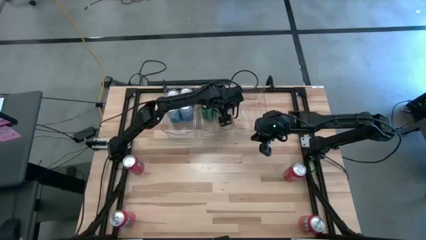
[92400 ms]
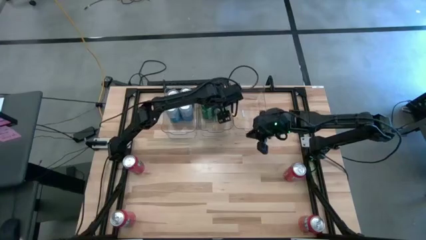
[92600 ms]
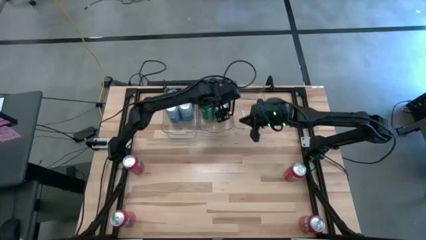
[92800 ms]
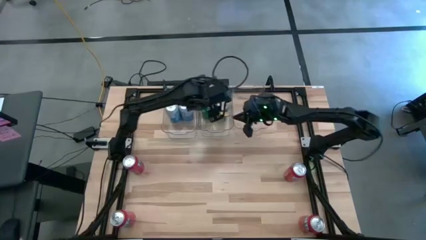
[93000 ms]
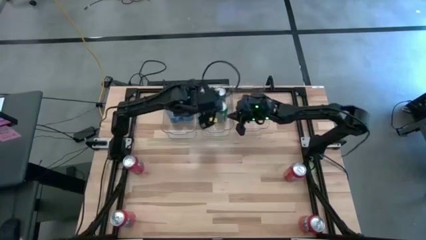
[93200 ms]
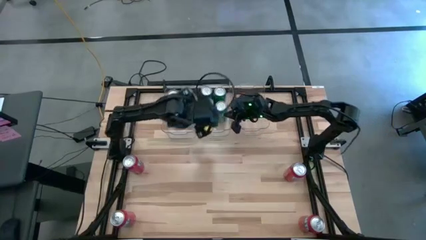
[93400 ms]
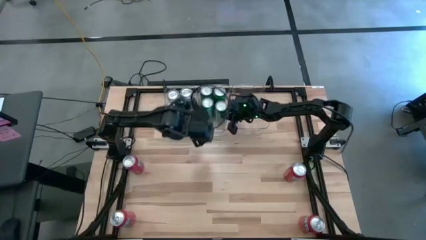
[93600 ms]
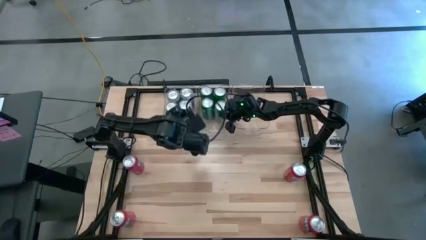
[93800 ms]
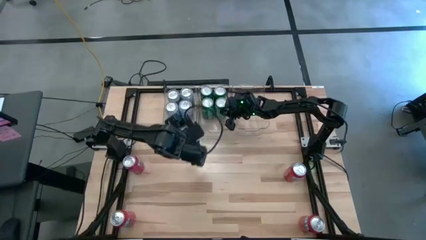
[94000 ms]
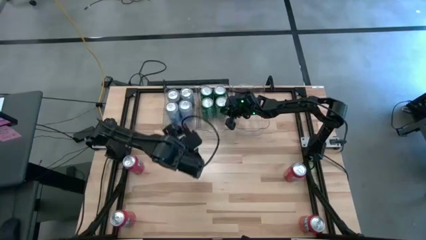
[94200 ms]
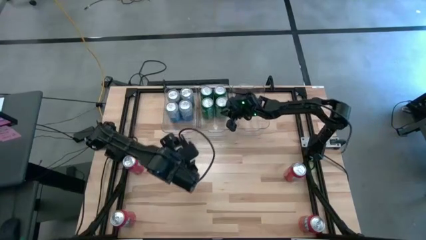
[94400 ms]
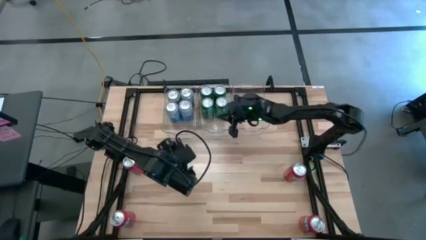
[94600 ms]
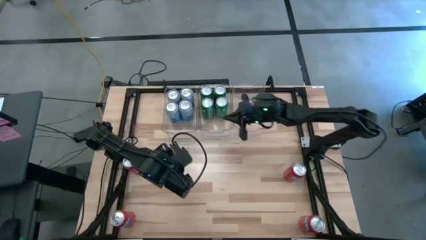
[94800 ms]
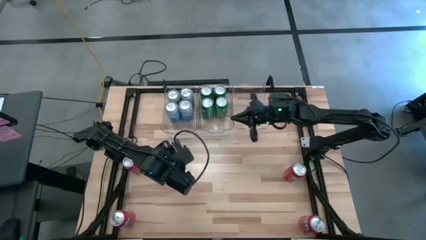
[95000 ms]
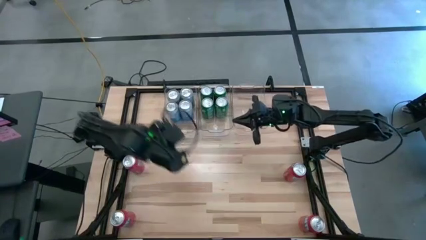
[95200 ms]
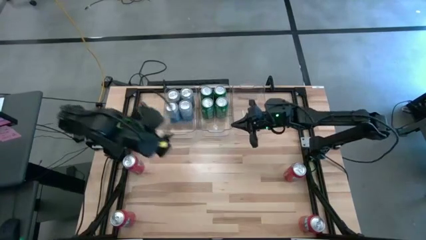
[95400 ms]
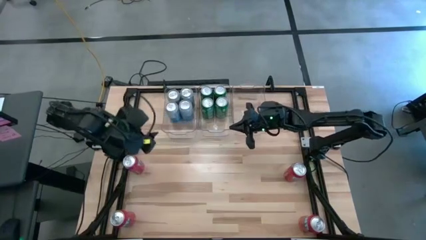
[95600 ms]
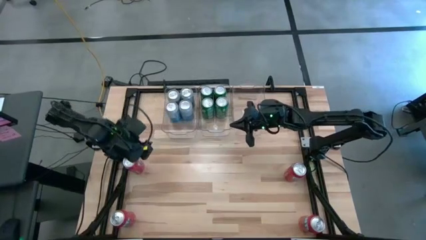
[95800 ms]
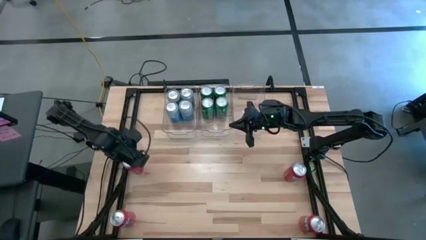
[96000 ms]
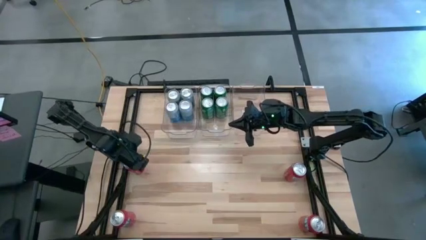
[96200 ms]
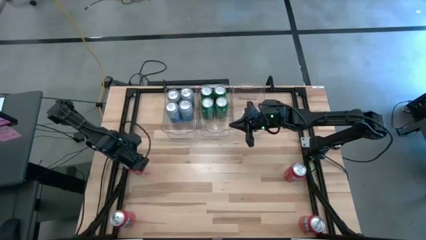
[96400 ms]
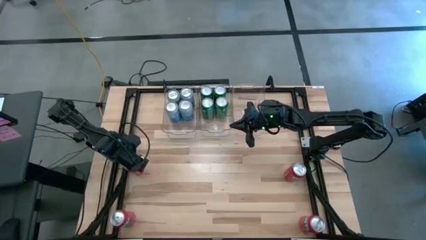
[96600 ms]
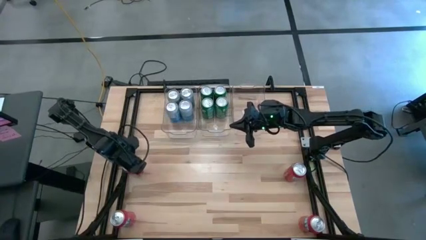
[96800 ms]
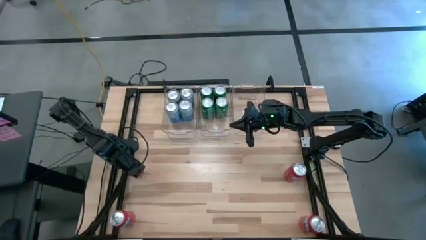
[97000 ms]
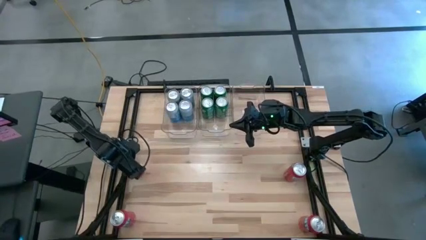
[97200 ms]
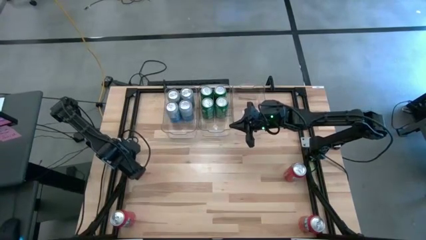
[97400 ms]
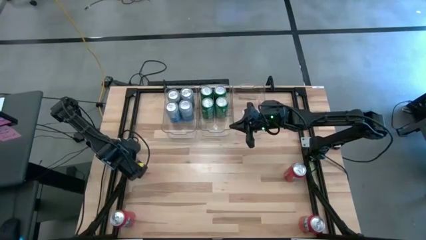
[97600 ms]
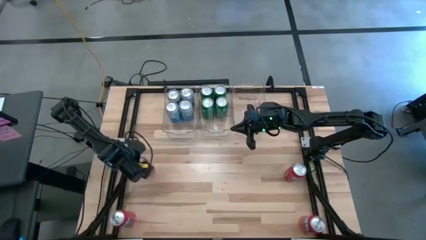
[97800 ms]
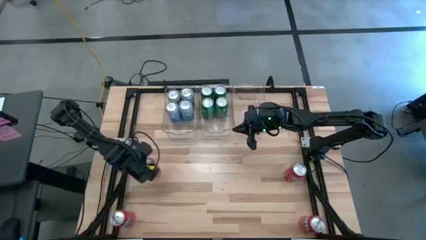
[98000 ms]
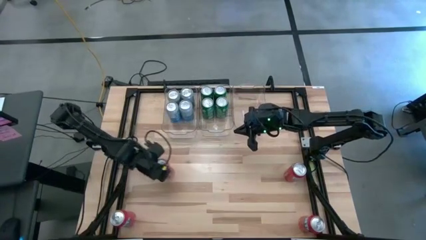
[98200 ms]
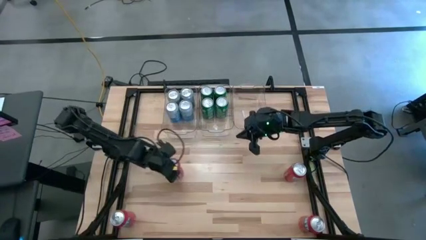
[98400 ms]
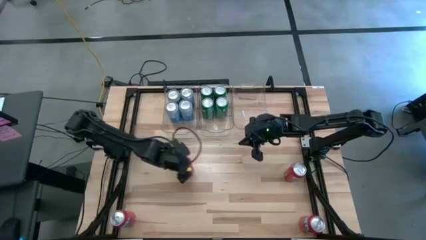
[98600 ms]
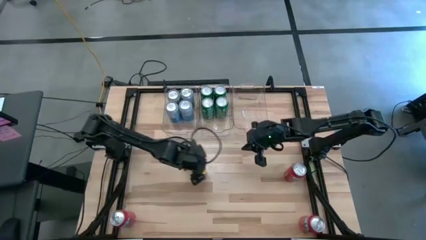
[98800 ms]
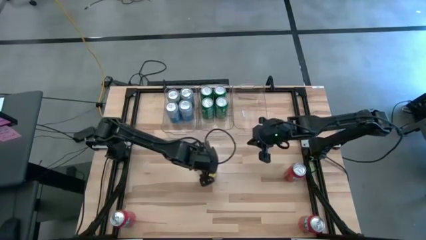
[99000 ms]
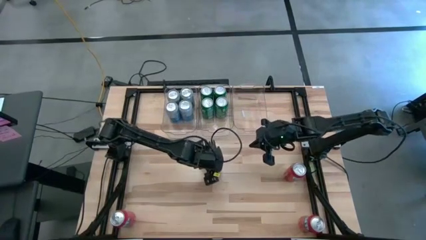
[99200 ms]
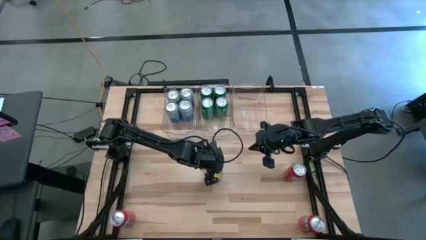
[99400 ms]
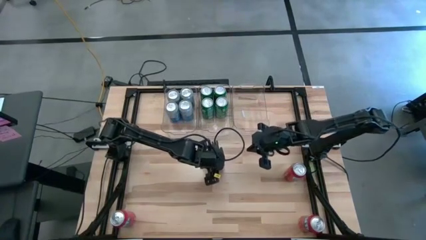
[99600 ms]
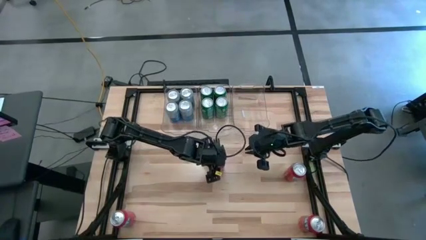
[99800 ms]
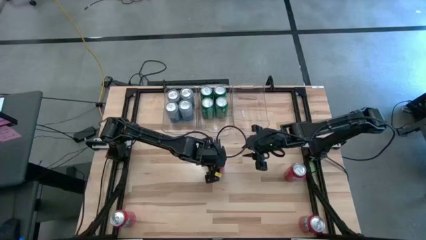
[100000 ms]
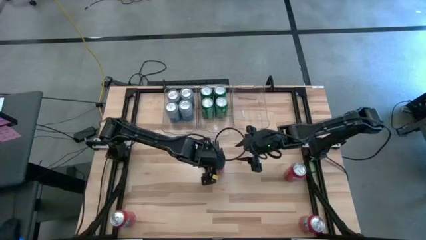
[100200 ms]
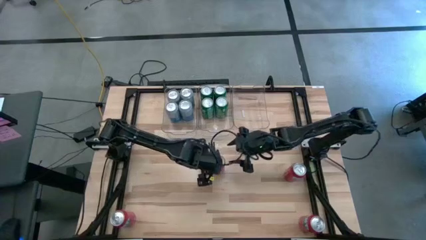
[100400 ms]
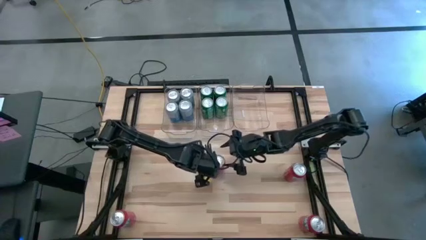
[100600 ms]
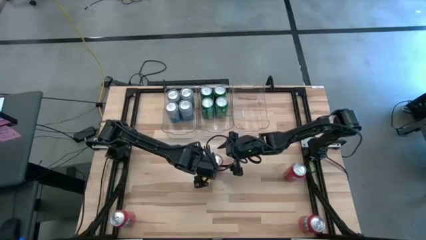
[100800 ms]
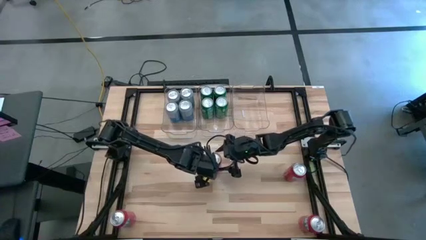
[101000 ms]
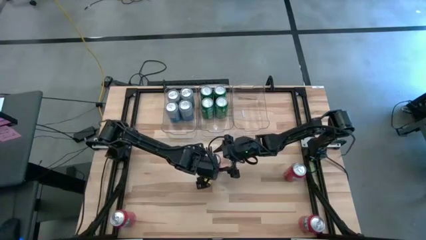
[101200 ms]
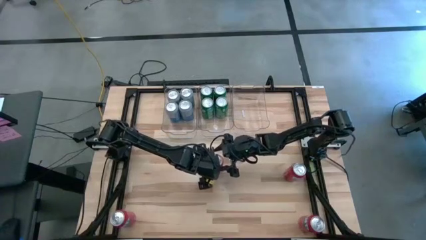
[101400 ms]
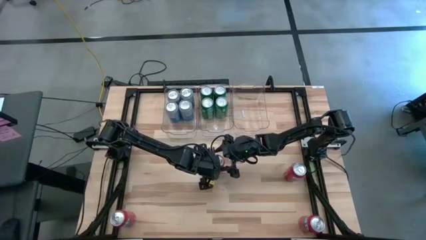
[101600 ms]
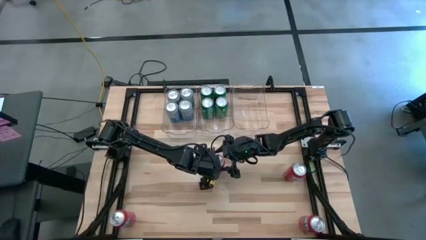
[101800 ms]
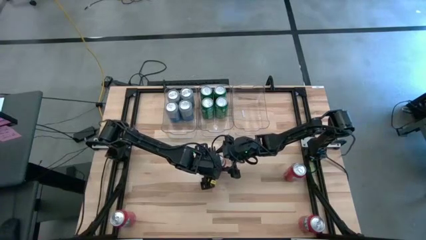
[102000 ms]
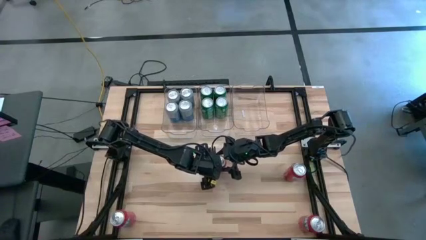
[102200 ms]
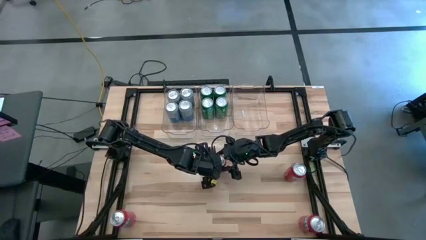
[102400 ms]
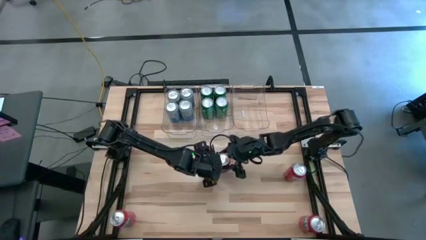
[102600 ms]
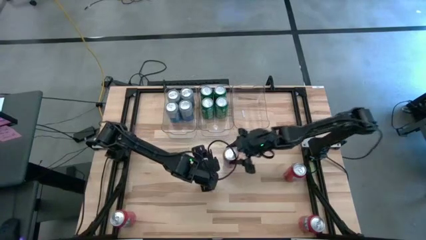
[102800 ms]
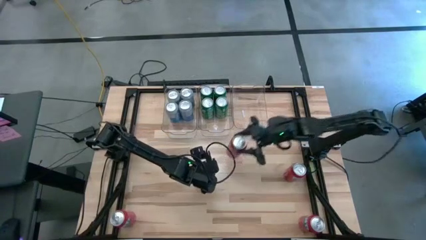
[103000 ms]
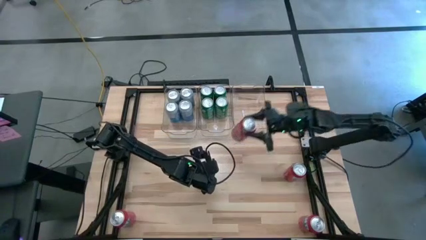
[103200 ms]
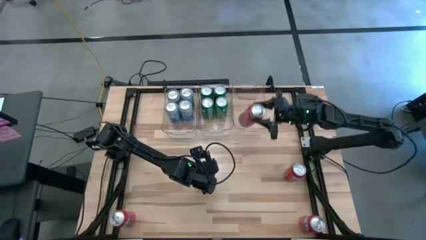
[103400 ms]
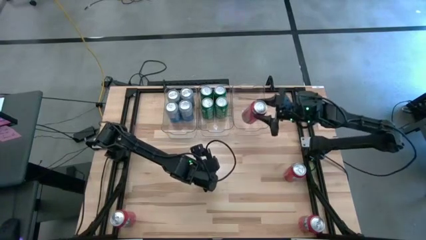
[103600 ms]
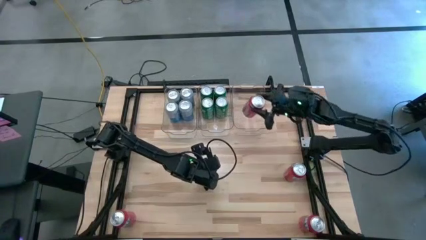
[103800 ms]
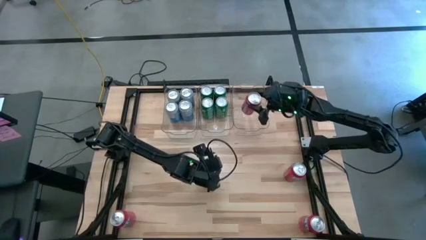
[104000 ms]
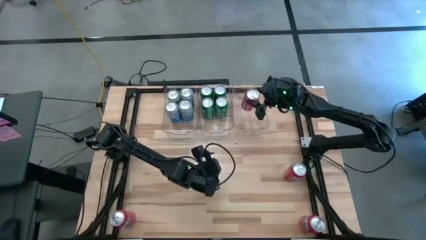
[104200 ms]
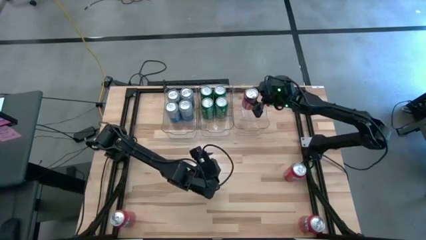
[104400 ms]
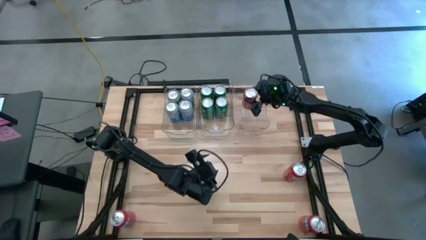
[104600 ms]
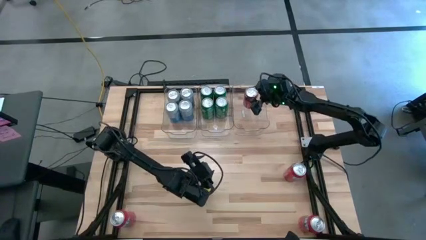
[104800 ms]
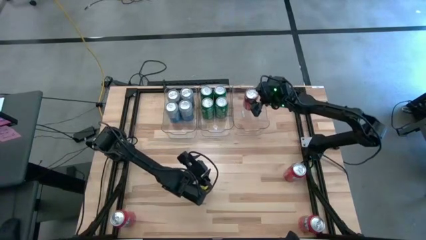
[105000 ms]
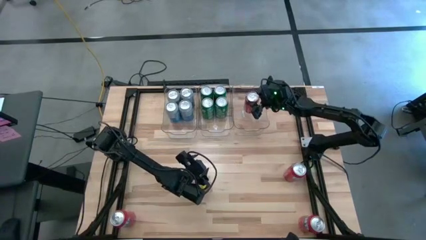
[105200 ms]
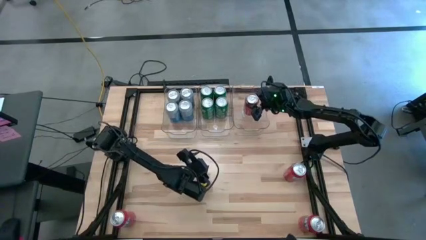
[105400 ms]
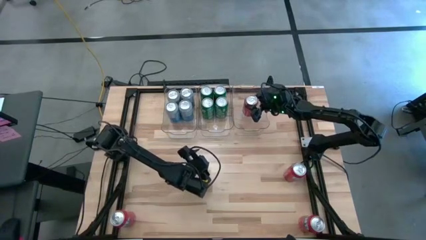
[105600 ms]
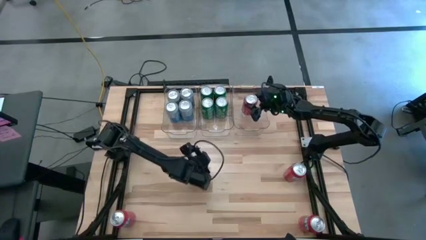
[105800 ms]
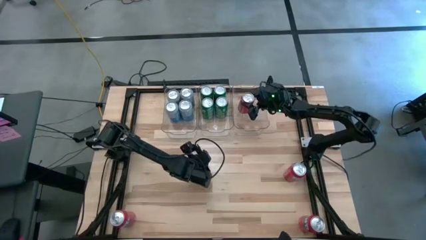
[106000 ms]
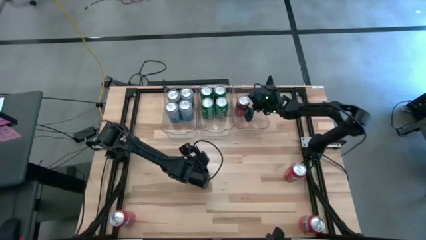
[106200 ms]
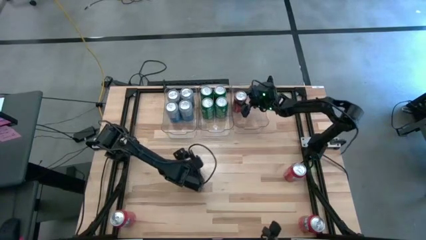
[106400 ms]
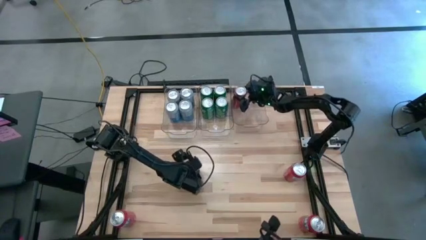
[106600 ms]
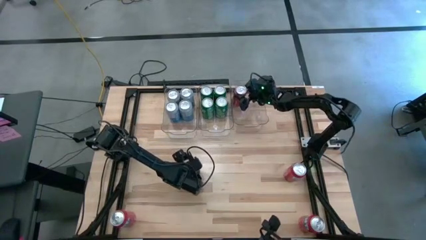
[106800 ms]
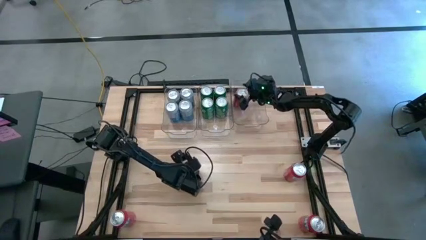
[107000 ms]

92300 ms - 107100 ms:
Task: Sort soda cans
Put the red soda can into the right transparent bin

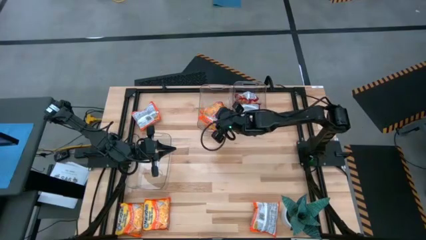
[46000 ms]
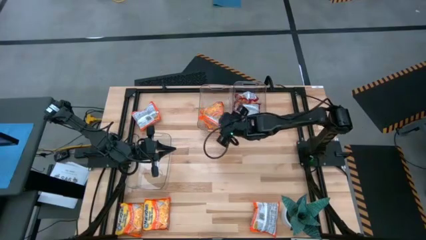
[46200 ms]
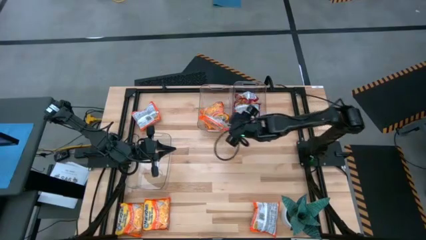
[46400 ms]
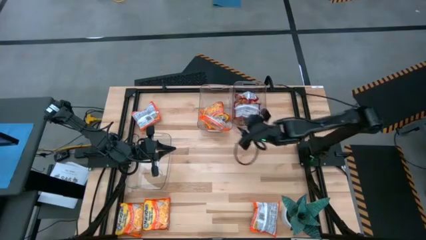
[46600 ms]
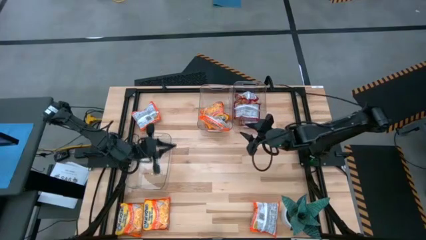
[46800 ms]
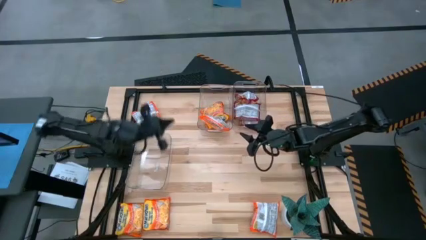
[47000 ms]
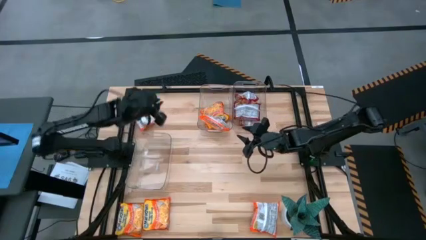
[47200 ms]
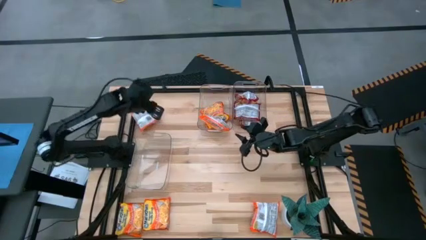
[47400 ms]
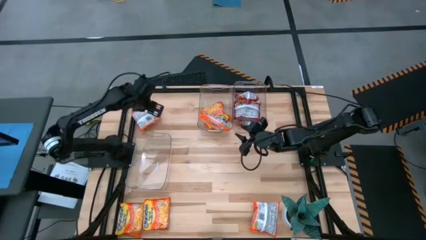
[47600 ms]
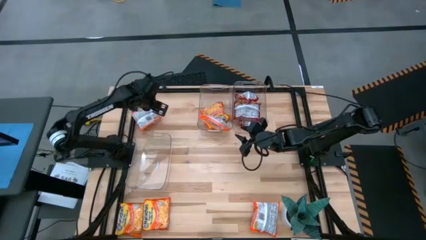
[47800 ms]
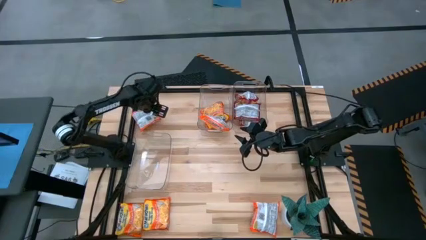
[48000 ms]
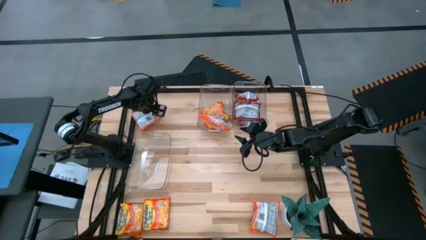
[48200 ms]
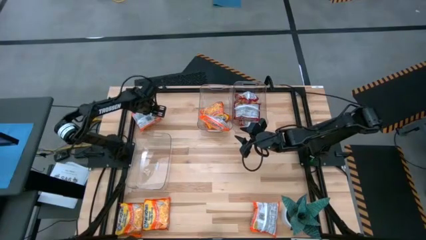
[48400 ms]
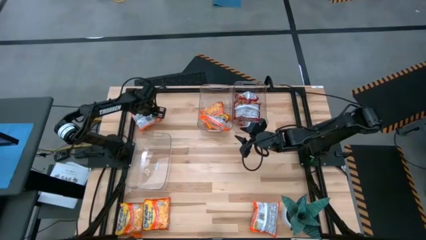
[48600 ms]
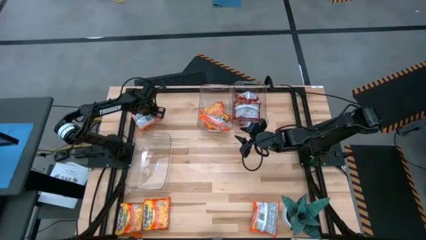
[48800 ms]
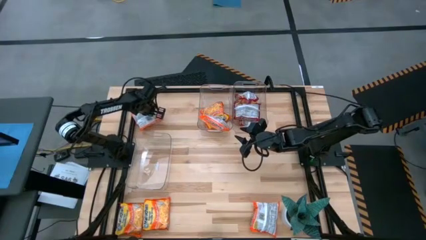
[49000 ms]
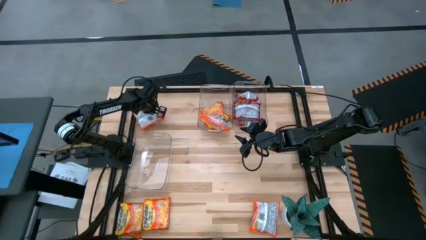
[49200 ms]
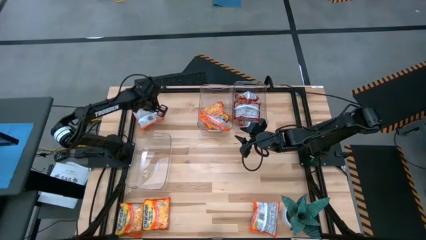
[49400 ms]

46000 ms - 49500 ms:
Task: Sort Maruchan noodles
Put the orange noodle pack into the top left transparent bin
